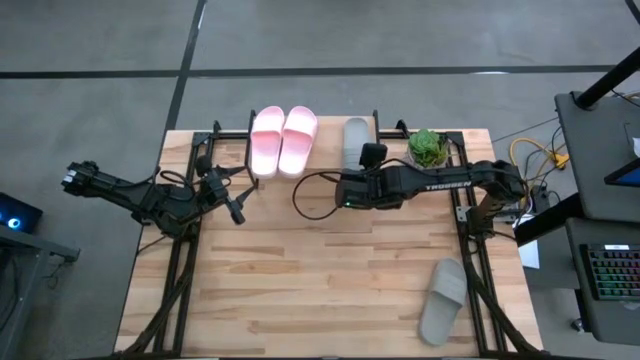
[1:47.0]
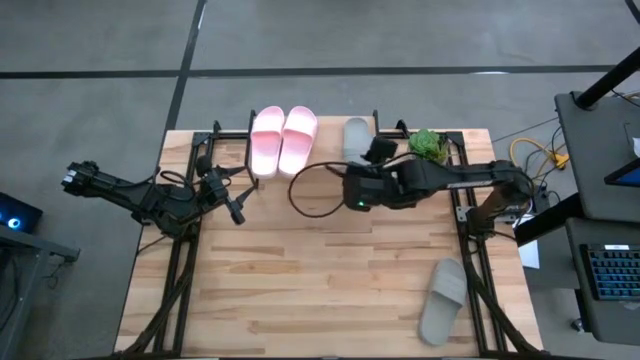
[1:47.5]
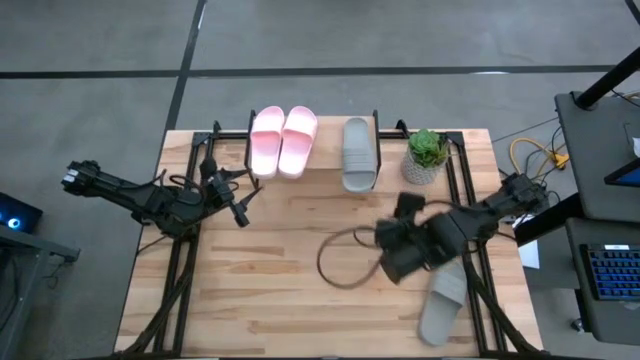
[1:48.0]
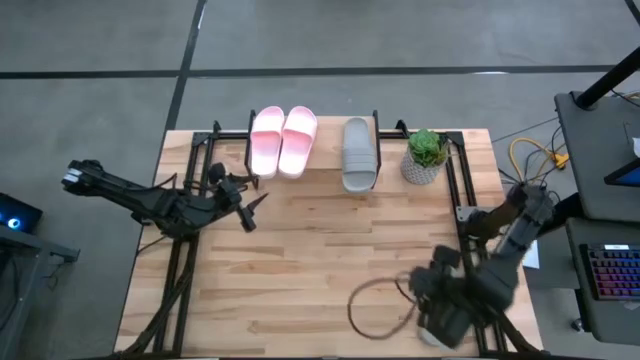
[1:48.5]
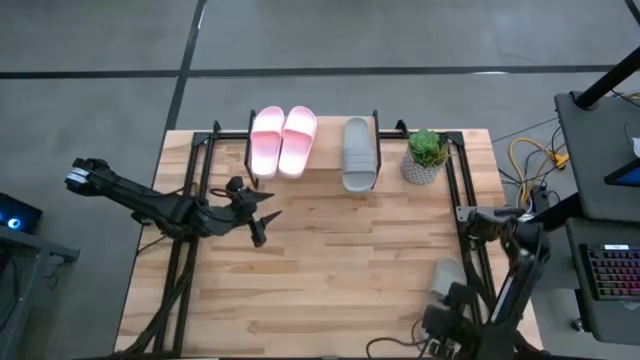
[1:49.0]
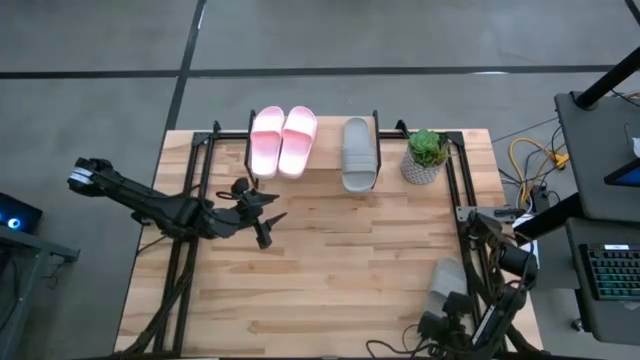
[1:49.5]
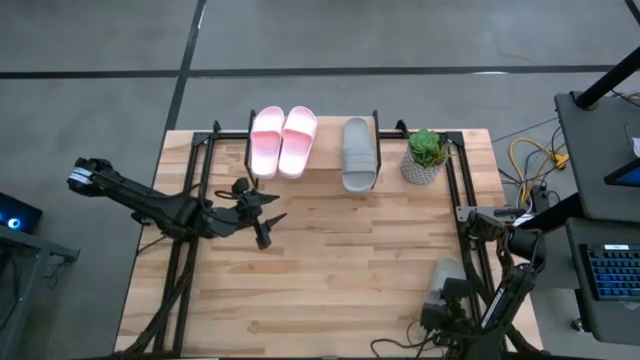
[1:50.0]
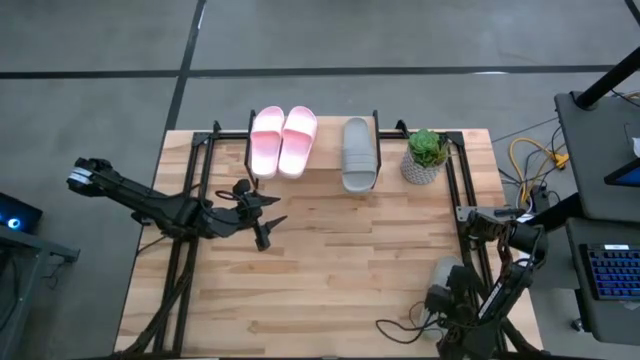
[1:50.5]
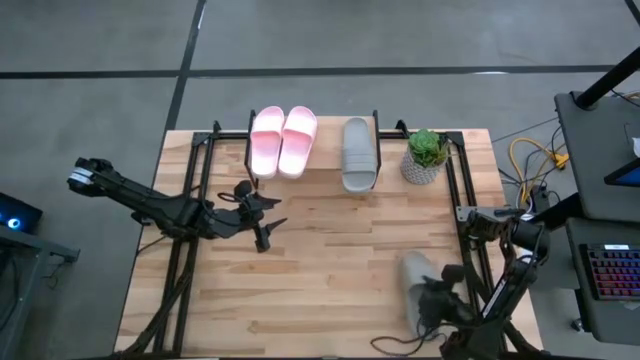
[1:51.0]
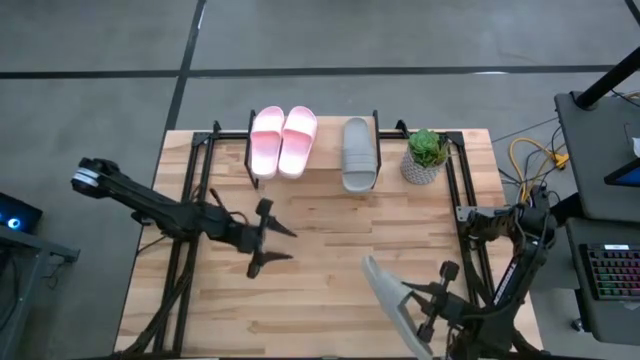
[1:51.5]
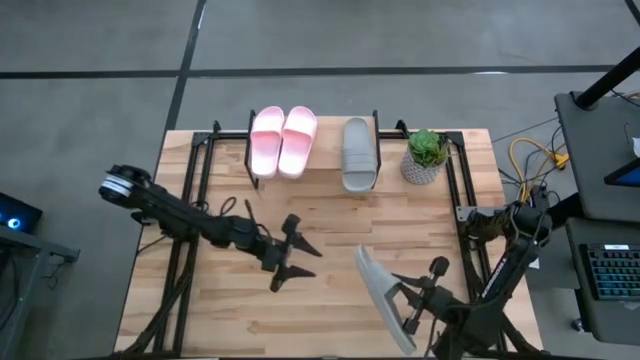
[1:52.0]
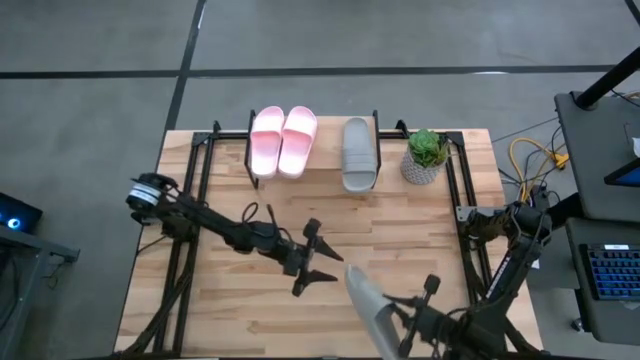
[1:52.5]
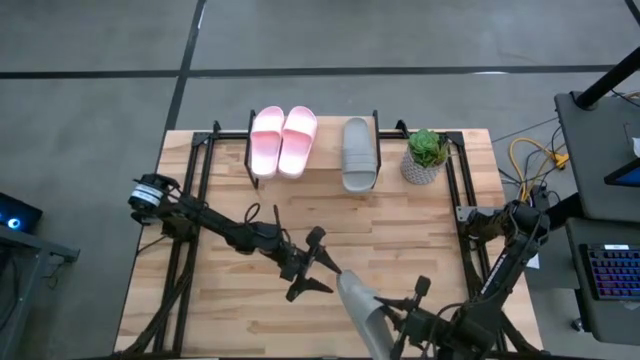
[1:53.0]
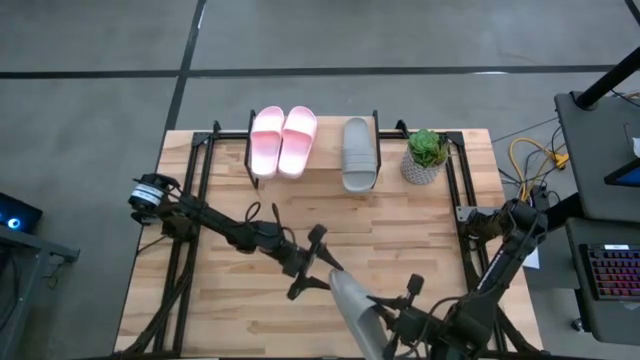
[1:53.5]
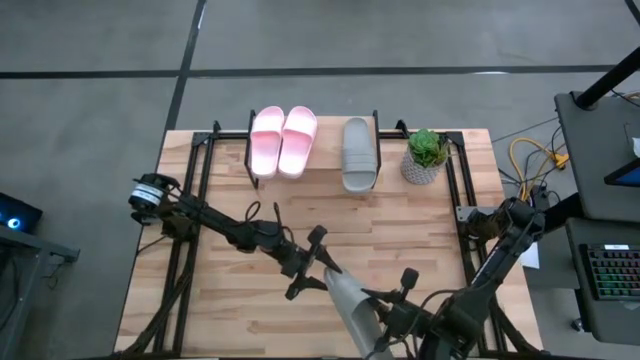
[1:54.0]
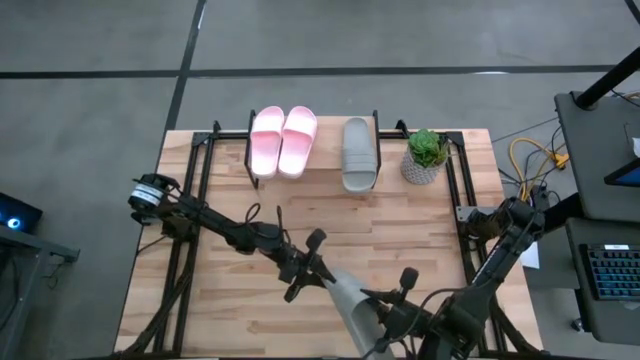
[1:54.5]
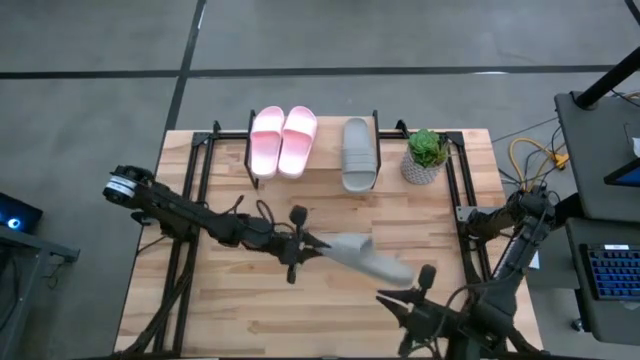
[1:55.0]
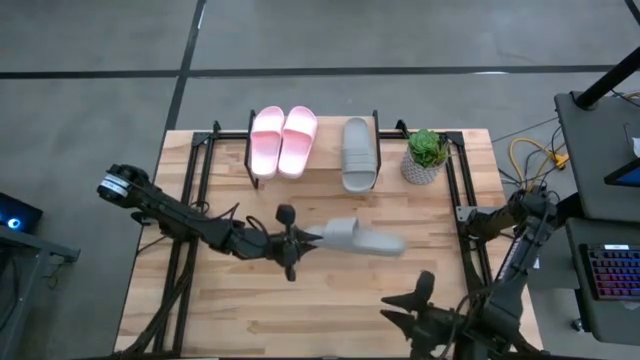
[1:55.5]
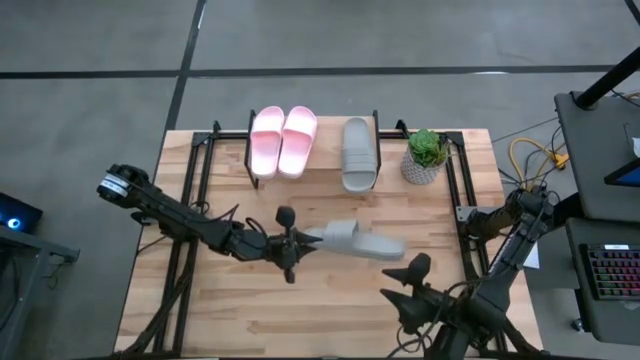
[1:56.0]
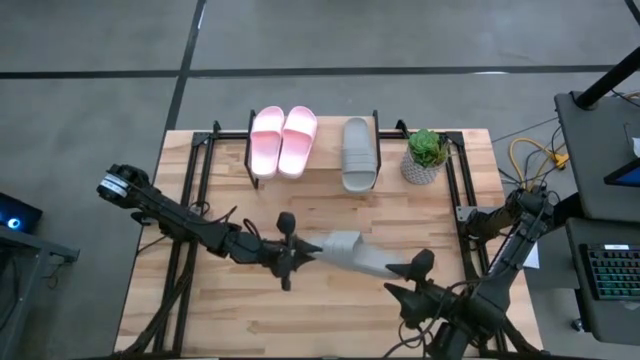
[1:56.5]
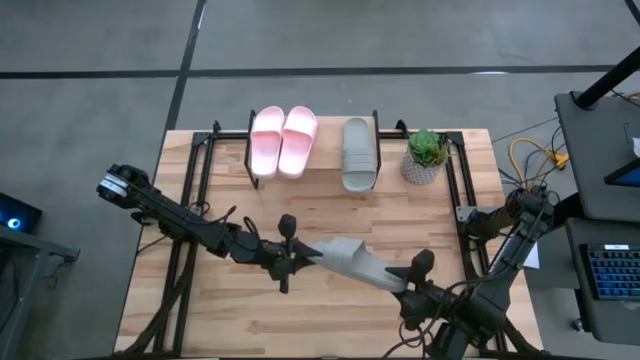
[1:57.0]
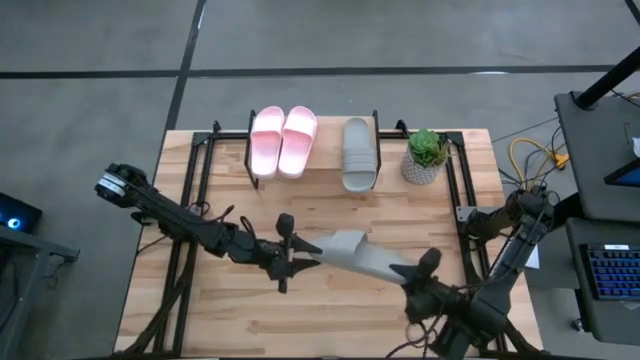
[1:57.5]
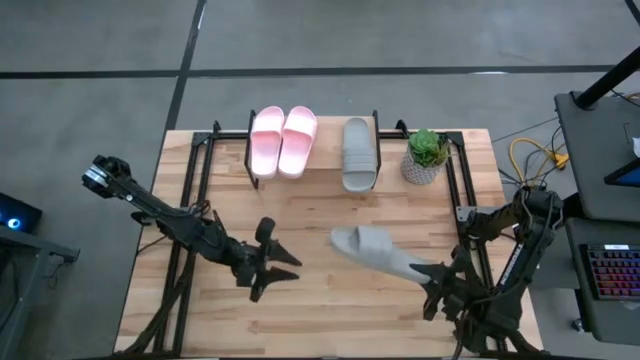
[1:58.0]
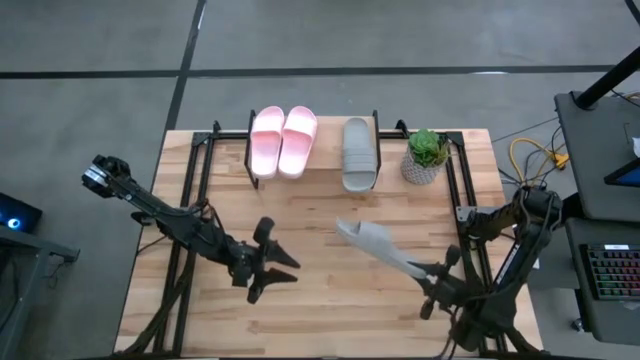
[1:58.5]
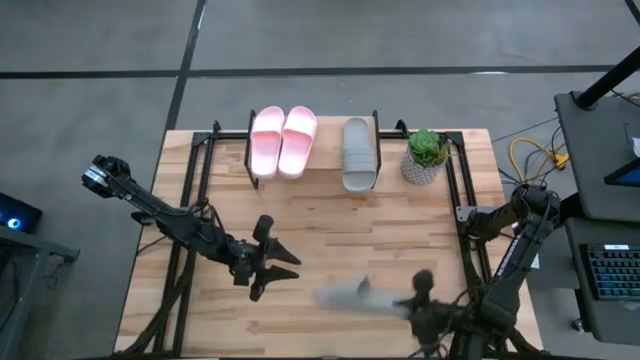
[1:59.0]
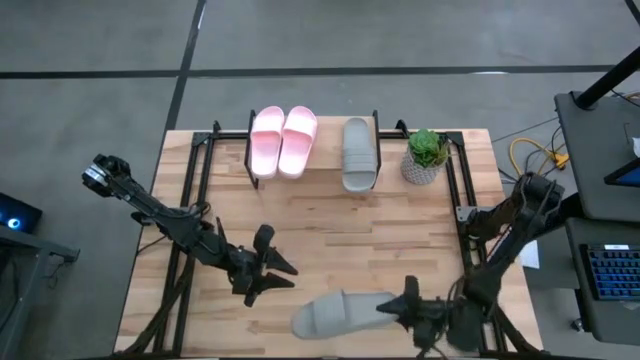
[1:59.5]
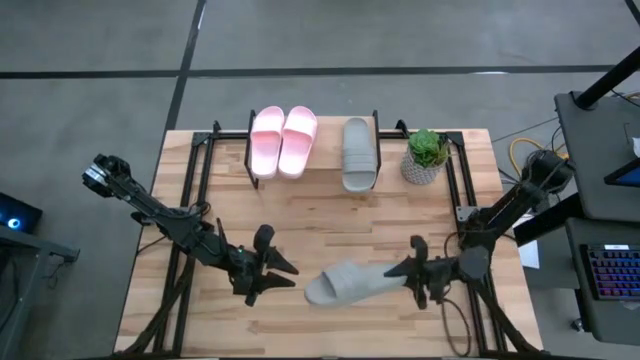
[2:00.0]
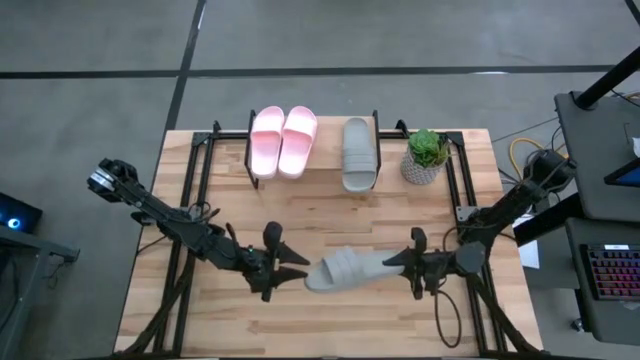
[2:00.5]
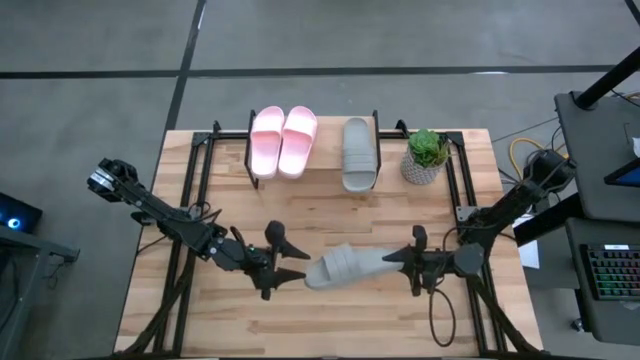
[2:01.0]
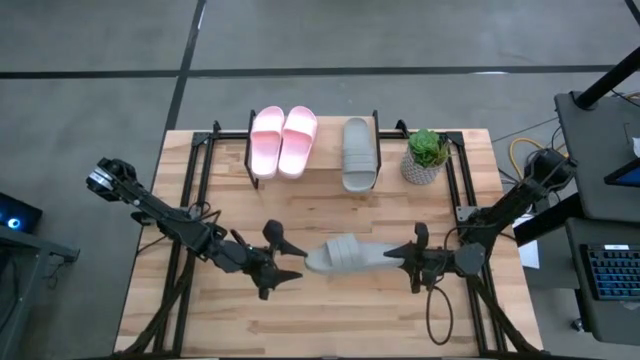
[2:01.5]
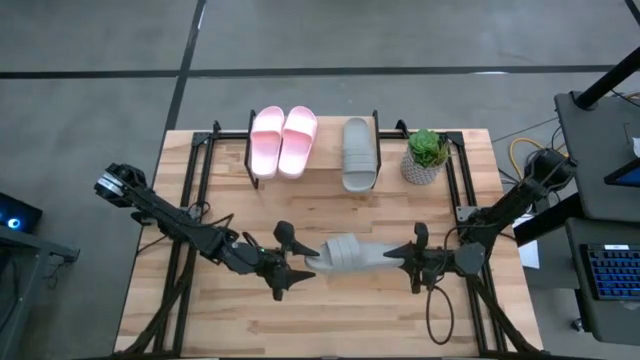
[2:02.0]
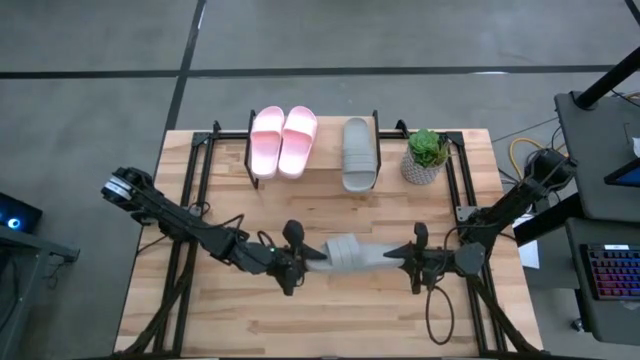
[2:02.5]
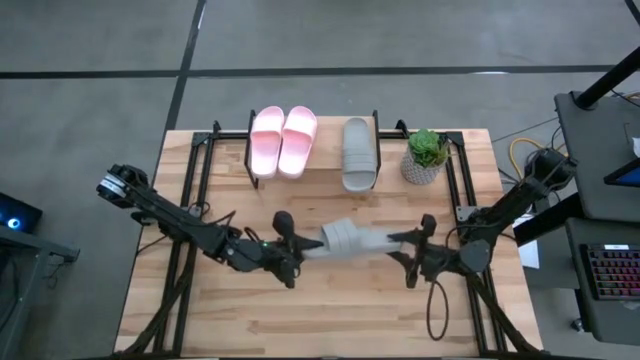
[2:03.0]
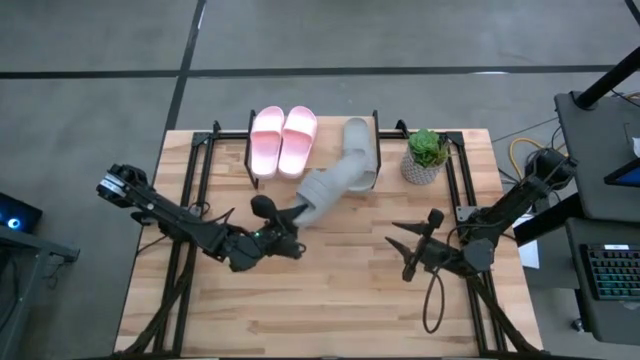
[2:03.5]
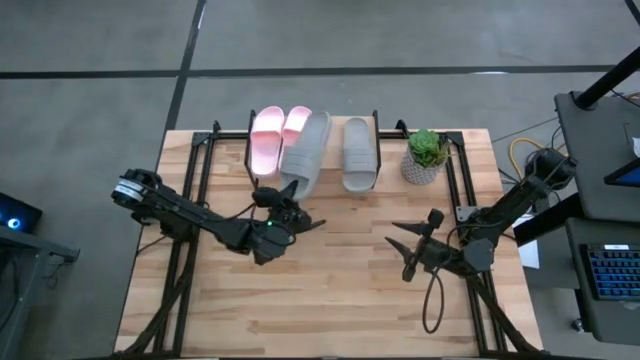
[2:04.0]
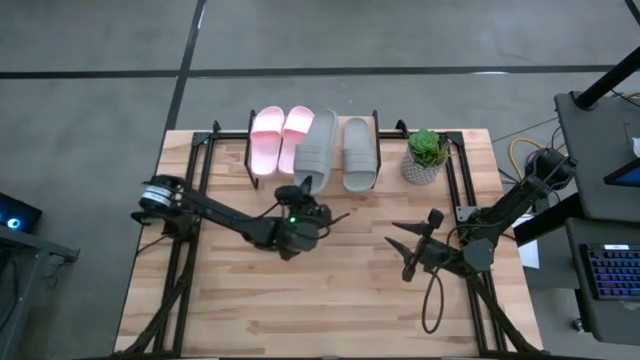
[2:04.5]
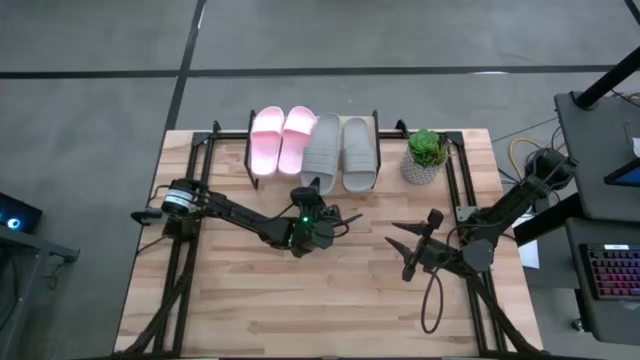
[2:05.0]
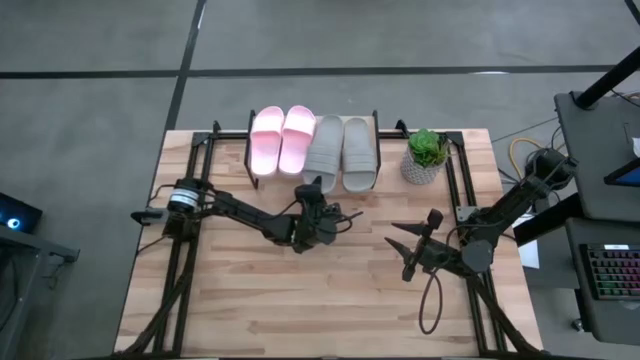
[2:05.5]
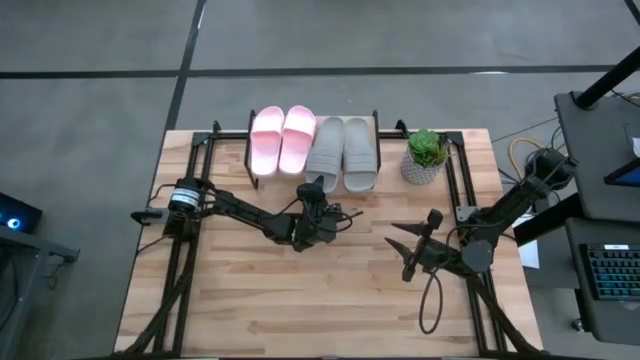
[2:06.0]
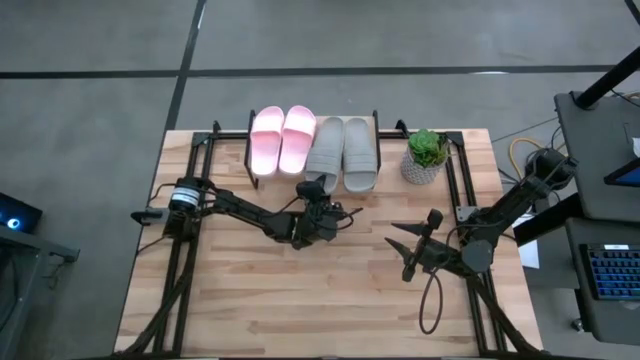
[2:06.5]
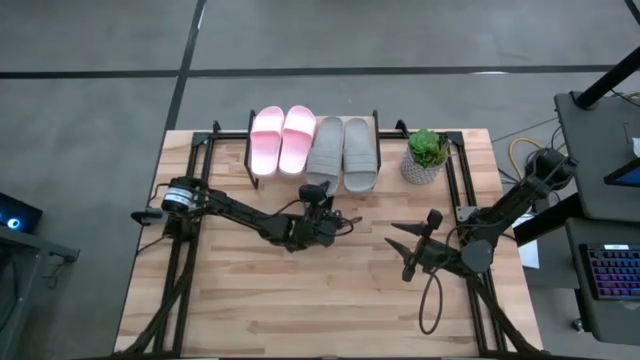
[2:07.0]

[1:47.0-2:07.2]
Task: Pick and place slides into the shelf
Put the gray slipper on the shelf

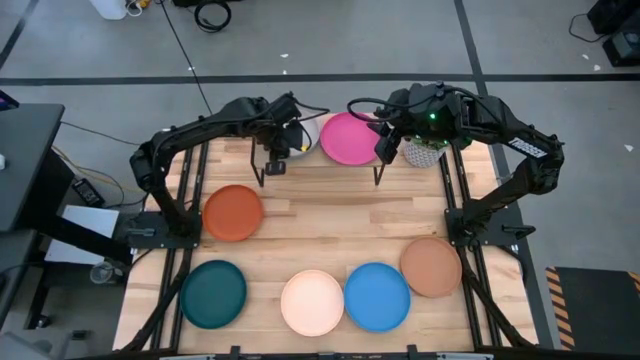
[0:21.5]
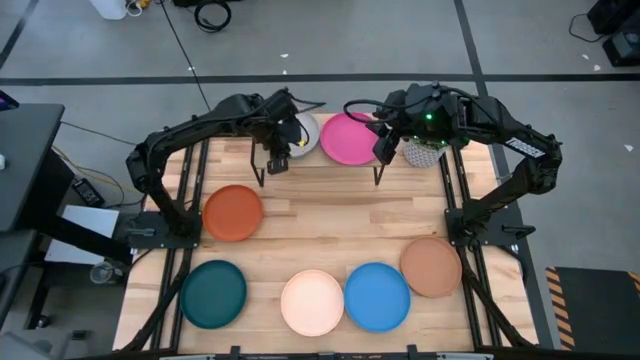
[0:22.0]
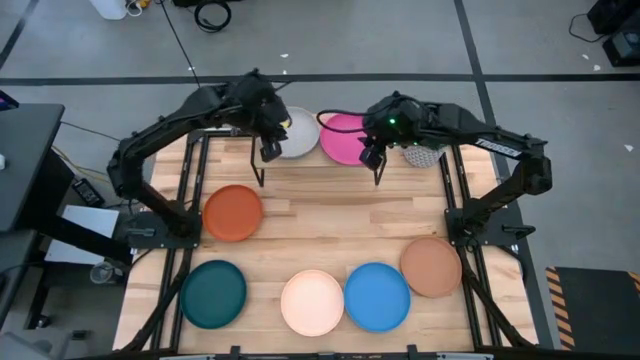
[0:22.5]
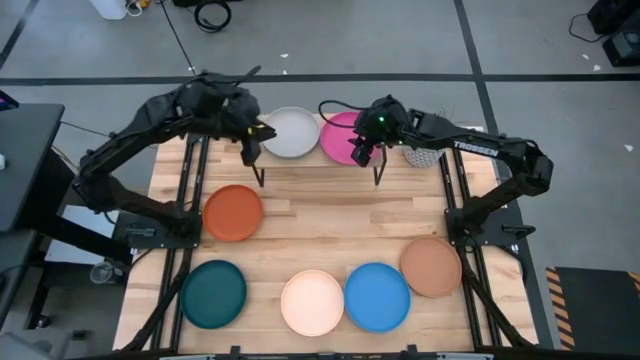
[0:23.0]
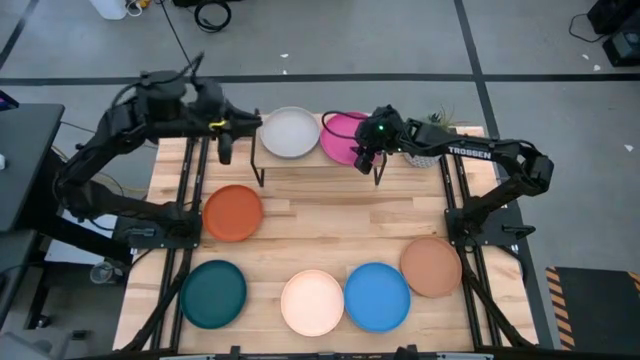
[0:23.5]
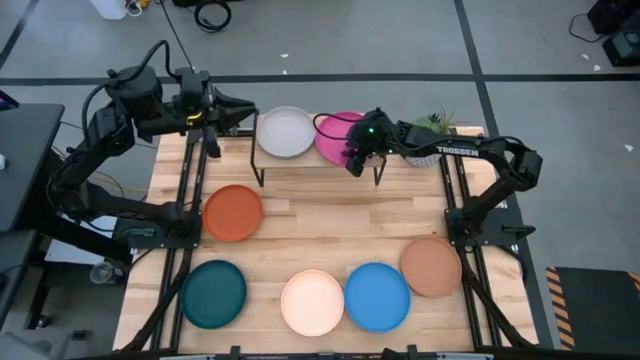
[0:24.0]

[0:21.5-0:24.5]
Task: Place and stack plates onto a shelf
Adjust the pink plate on the shelf
